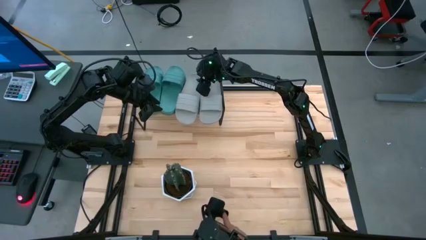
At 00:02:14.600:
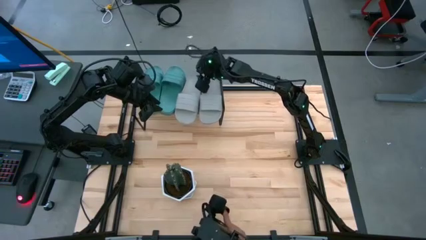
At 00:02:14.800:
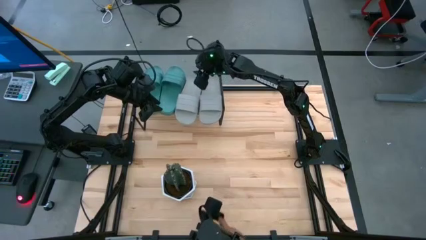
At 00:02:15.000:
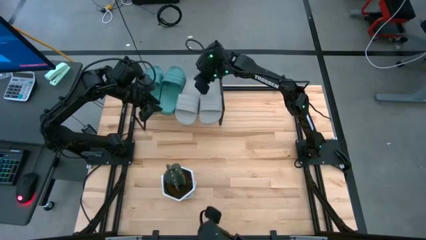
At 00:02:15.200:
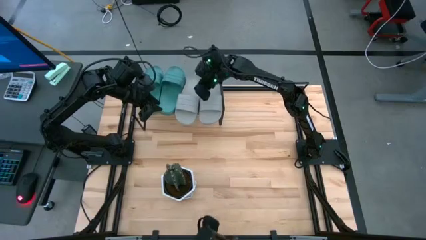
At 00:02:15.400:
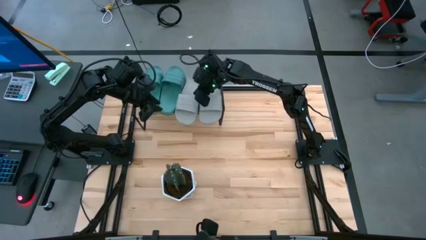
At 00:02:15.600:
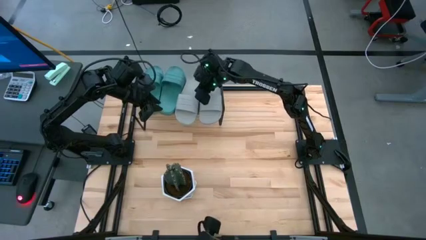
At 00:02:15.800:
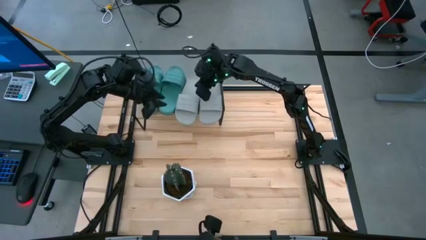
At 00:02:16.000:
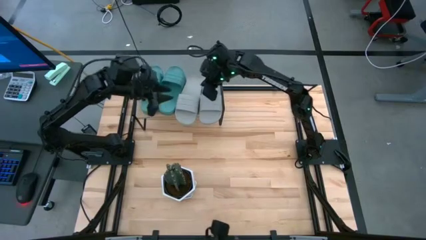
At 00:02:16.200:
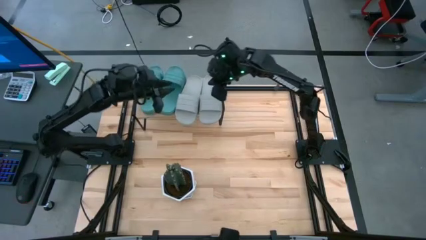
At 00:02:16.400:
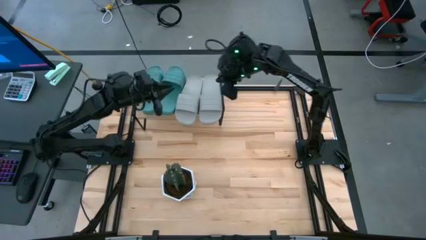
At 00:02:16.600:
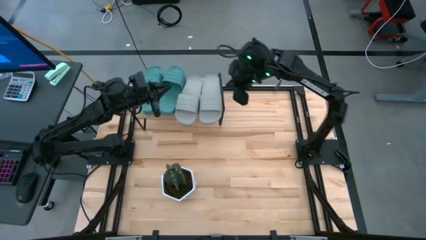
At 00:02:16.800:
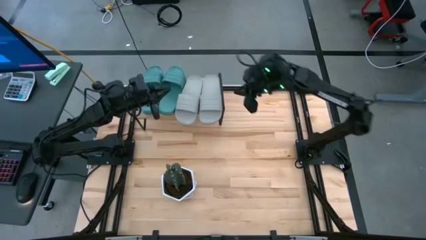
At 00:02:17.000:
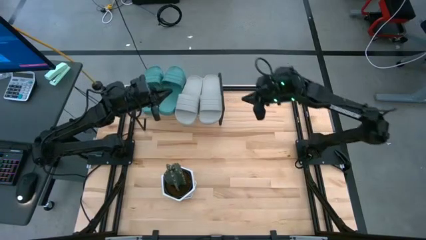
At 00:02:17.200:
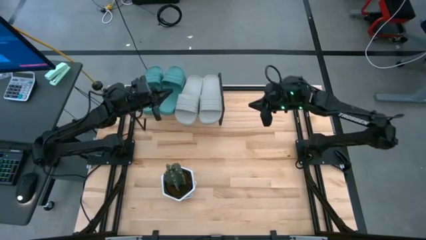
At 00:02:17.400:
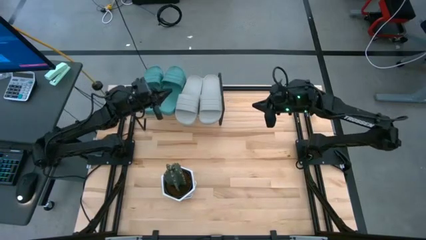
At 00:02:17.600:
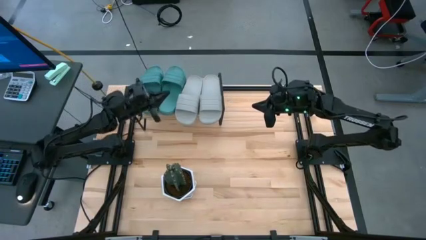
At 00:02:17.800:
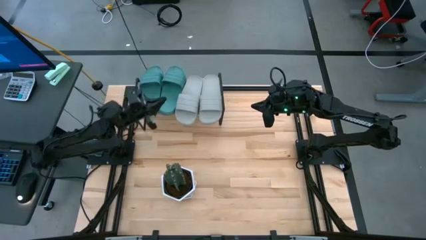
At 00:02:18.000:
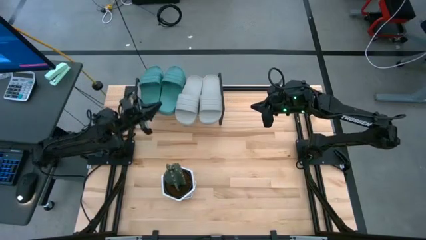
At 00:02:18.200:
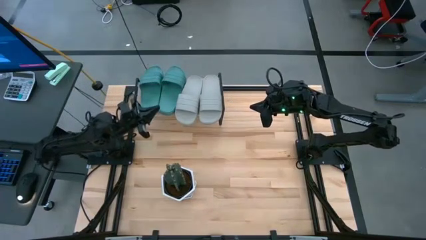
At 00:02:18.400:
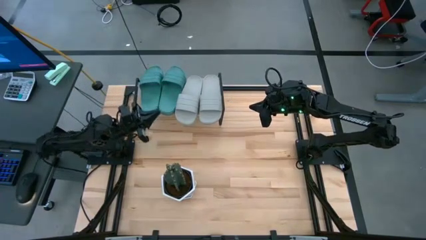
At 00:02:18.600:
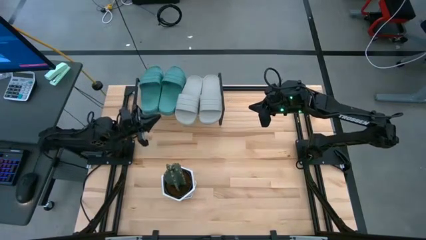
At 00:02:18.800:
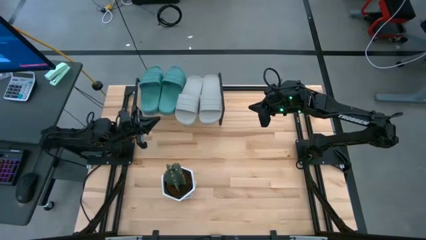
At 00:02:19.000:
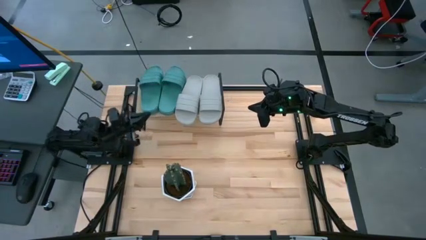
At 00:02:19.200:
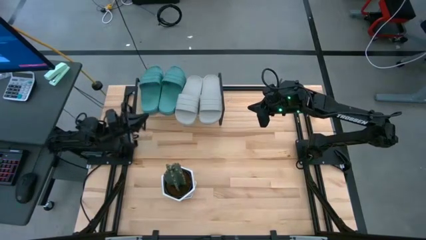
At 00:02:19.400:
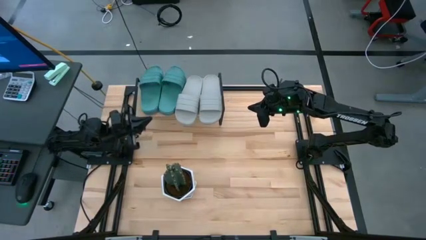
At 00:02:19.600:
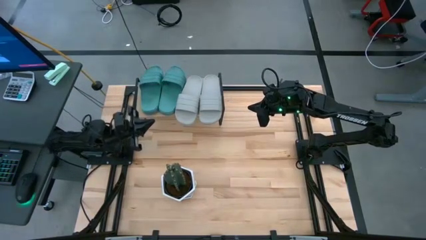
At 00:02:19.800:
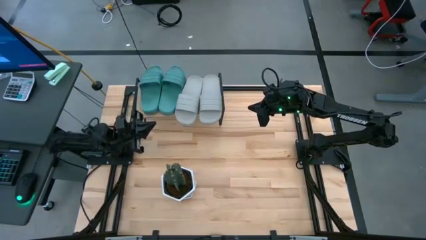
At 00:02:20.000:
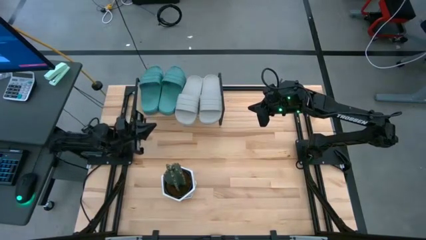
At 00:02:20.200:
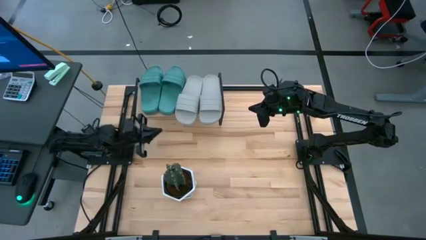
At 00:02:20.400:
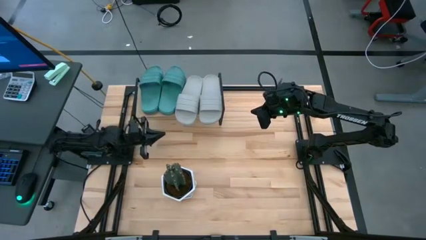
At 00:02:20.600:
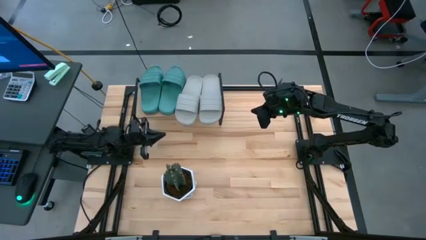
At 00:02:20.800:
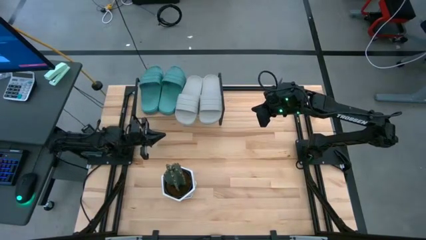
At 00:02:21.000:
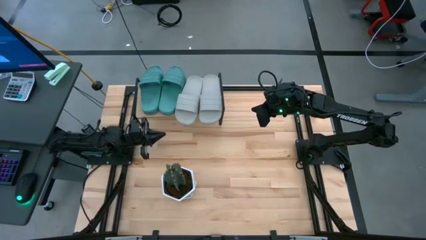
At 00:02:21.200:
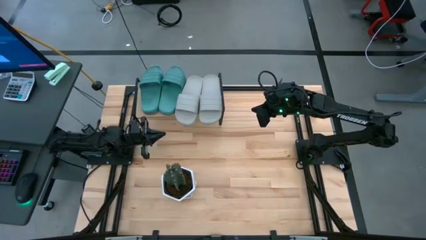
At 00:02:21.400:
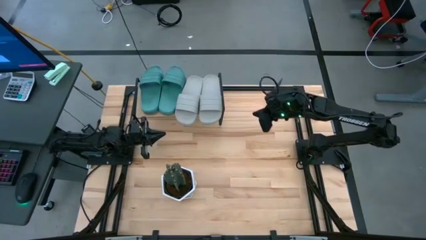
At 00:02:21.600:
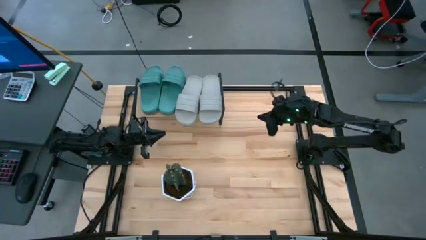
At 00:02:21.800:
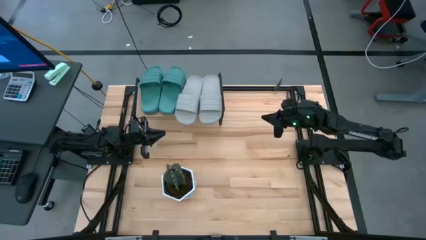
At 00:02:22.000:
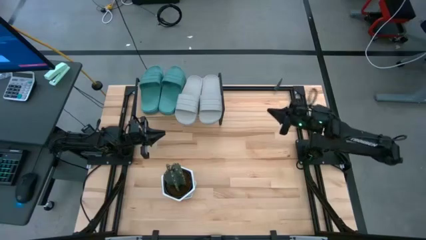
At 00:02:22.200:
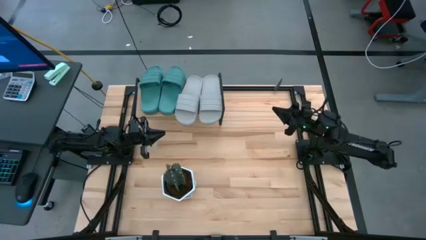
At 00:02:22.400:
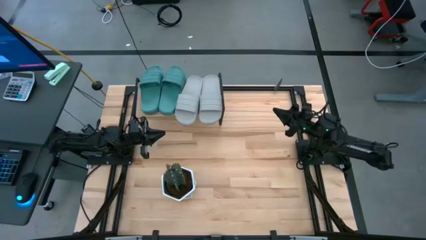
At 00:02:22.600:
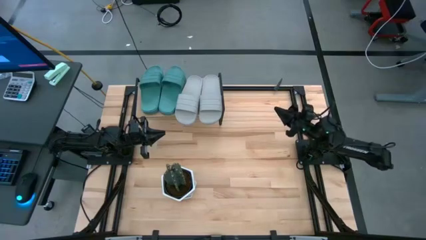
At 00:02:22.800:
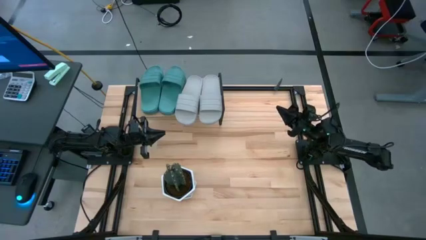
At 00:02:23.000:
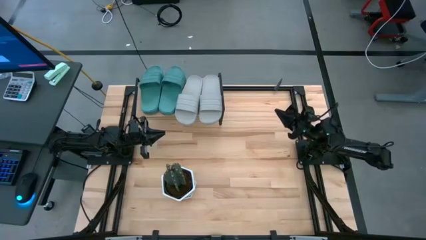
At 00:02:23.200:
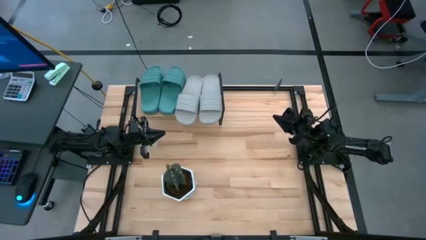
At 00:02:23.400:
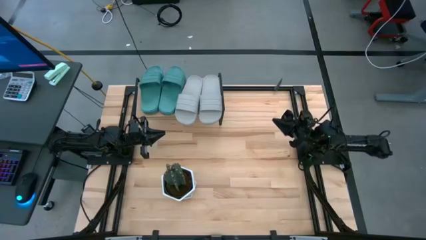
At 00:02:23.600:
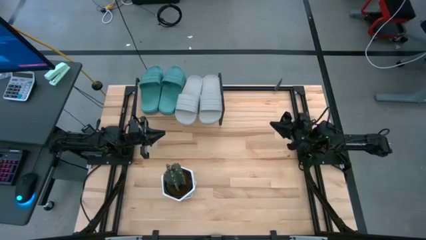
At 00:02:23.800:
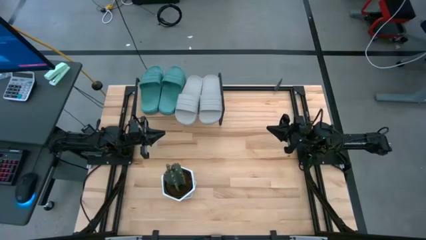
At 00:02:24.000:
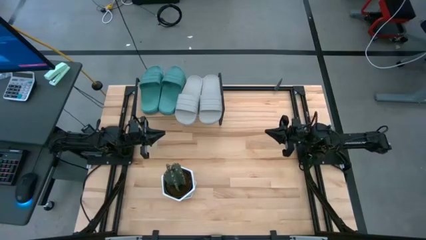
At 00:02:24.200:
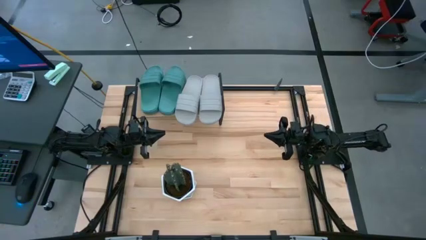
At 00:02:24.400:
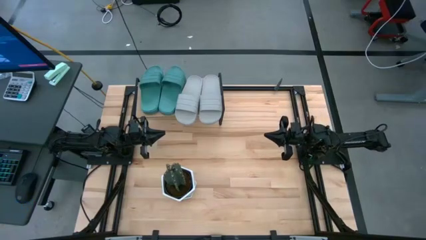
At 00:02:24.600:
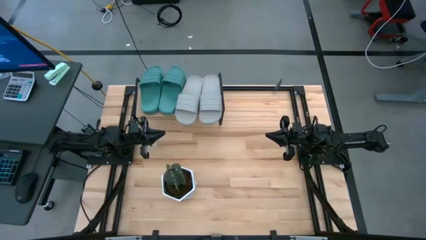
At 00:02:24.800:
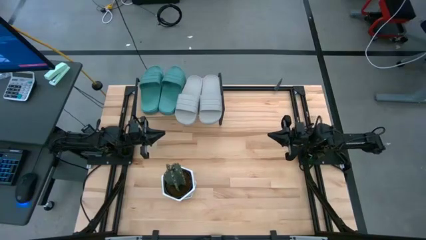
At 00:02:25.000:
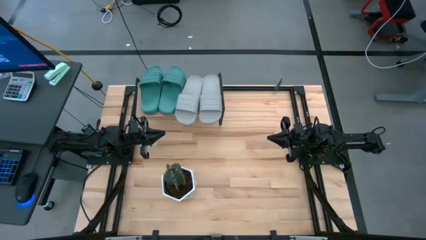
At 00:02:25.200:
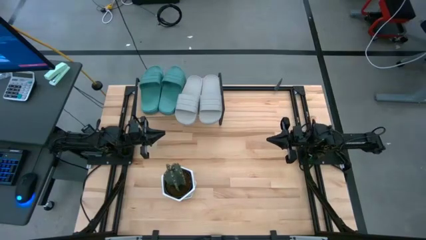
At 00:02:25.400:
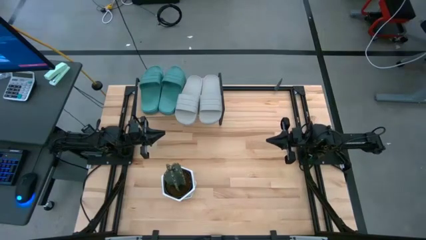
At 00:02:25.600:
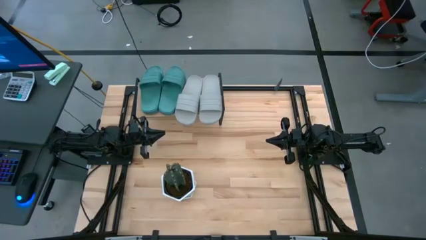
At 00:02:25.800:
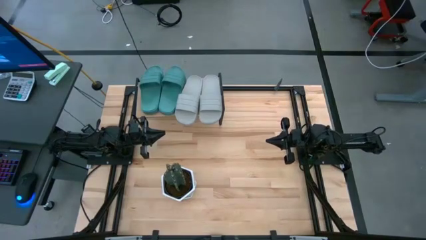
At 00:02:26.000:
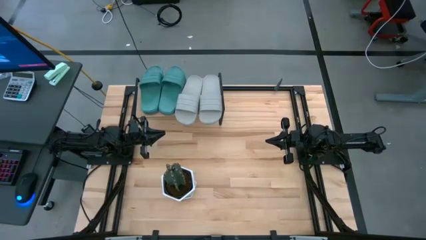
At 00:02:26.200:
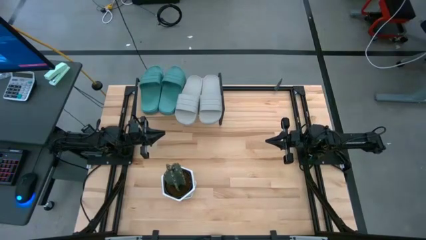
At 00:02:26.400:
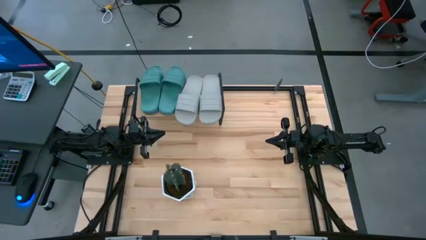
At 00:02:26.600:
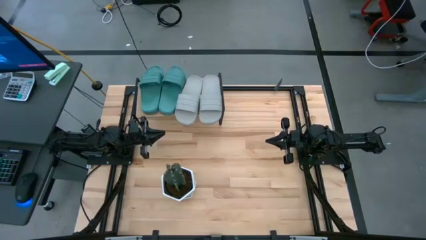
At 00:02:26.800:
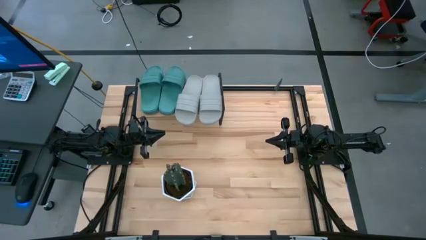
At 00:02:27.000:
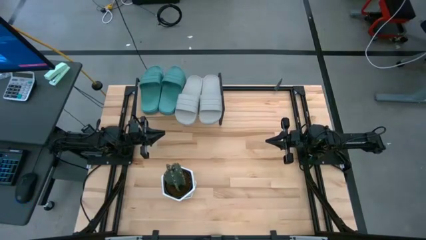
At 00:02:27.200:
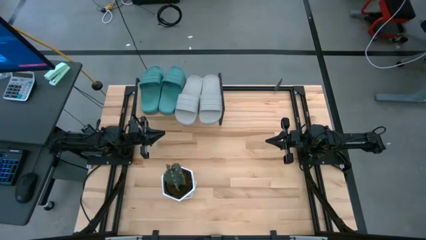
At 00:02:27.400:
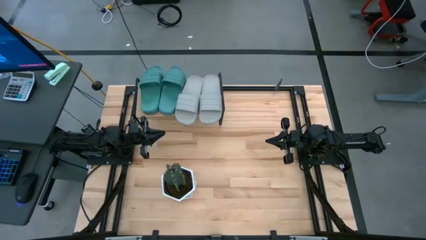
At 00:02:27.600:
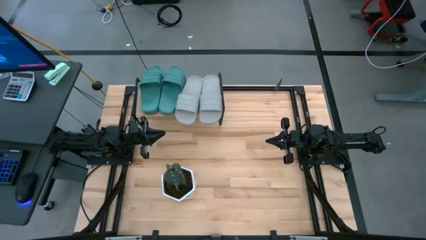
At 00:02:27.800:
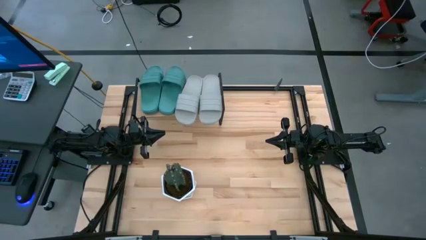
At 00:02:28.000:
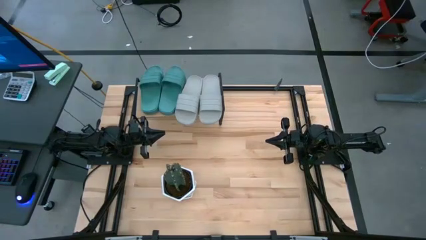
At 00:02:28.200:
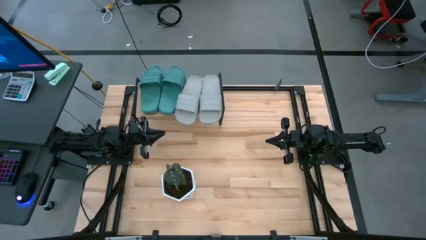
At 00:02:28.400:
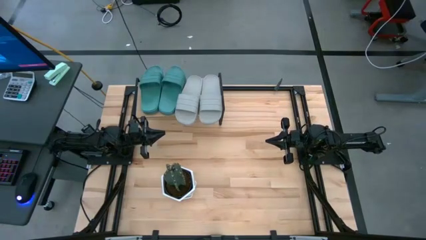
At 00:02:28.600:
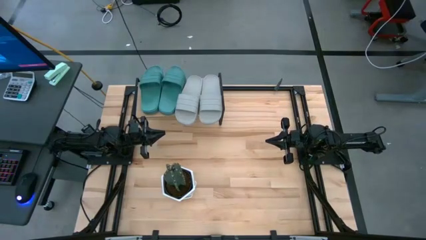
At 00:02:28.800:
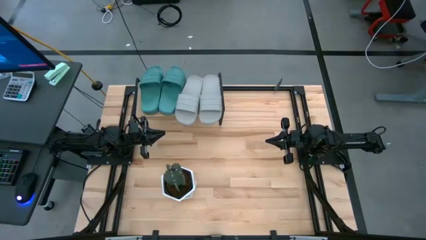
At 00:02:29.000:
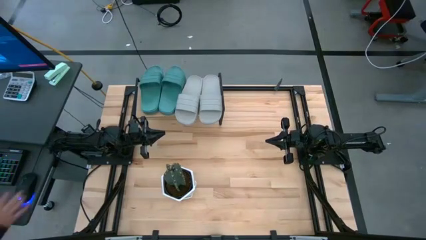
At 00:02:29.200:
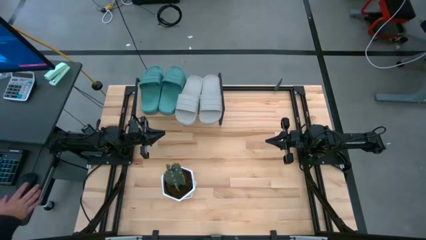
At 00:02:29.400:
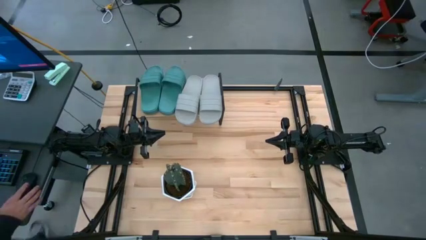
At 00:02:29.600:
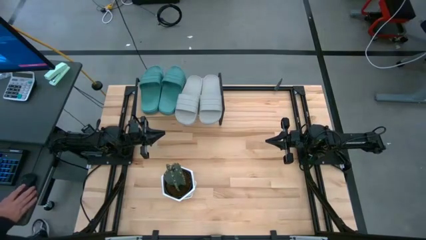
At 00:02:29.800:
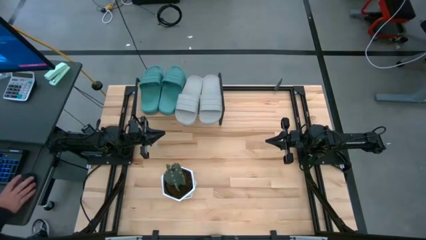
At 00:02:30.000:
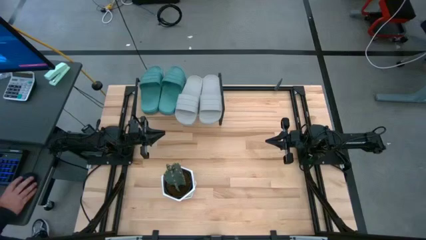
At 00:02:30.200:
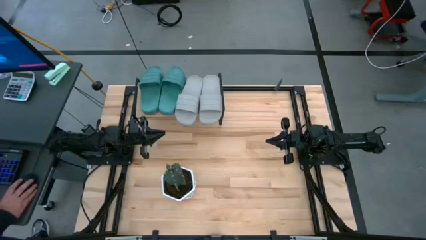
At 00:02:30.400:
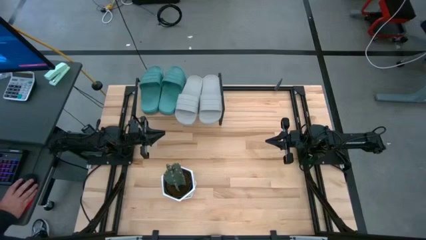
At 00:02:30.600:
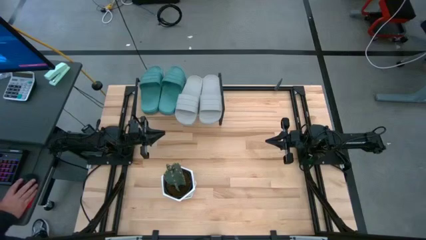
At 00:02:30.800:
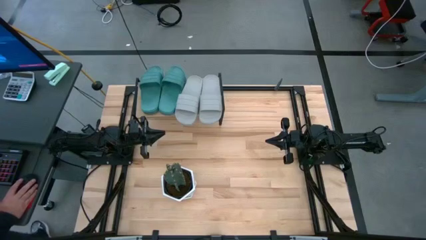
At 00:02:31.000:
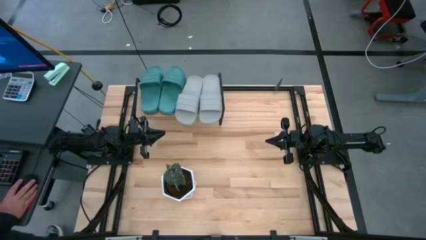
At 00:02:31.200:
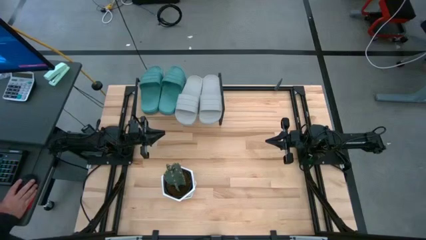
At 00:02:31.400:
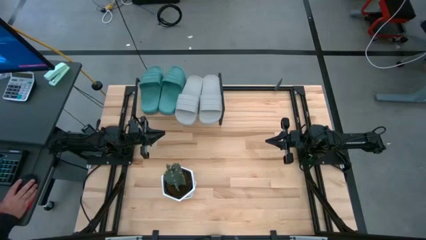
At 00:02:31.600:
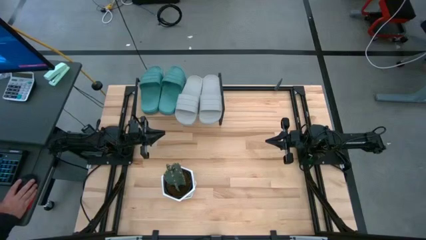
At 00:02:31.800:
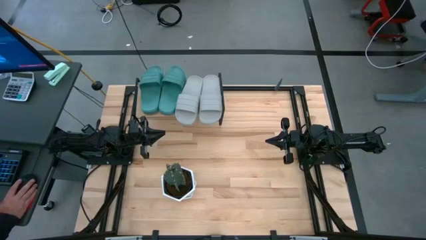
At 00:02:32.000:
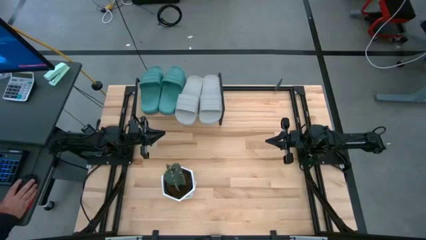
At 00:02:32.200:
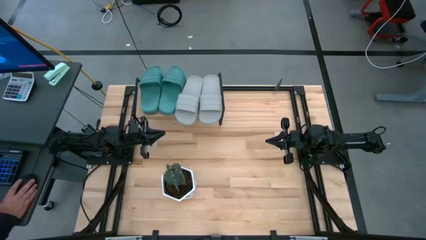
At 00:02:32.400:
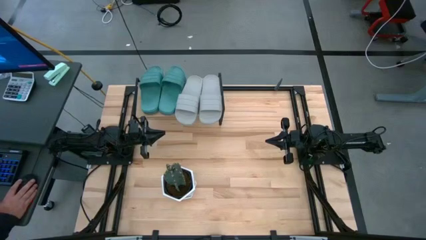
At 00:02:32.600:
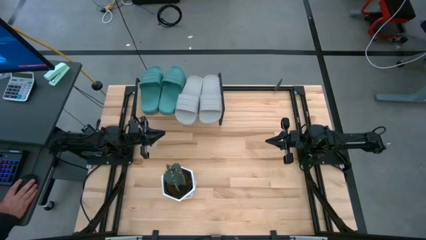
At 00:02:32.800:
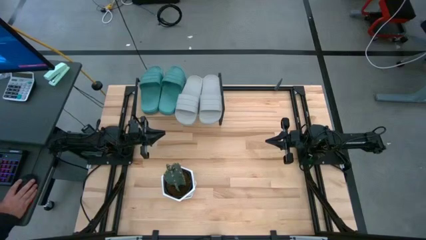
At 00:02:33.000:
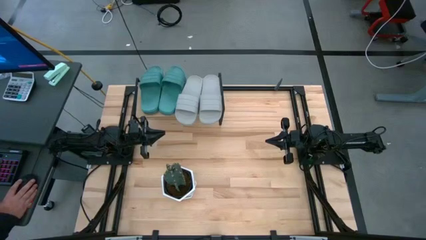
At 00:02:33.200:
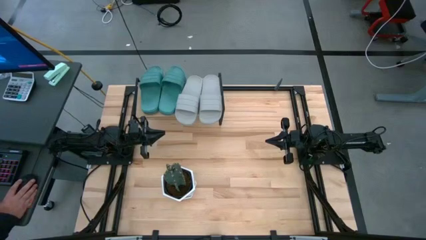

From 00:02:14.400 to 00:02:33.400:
Task: Pick and place slides into the shelf
Return to Home Position
